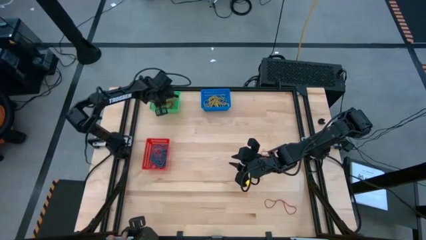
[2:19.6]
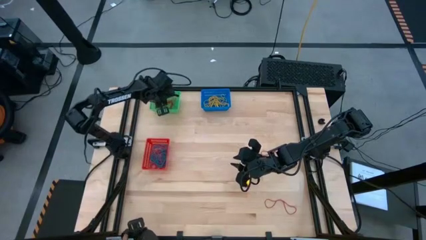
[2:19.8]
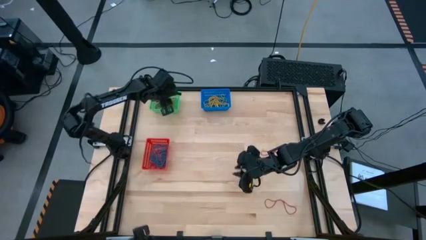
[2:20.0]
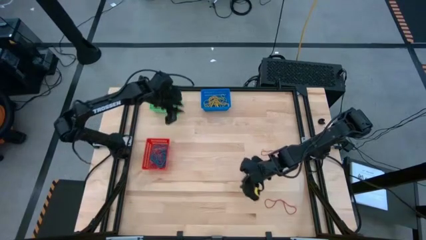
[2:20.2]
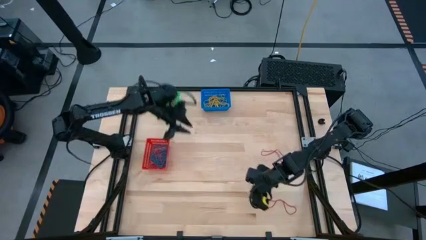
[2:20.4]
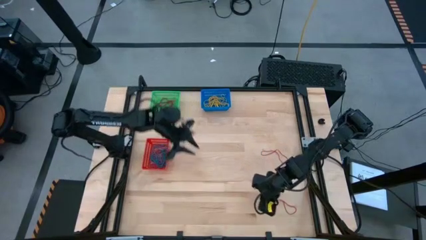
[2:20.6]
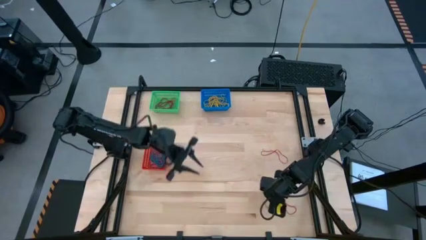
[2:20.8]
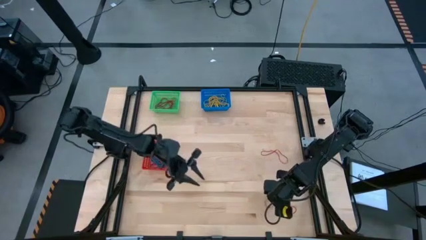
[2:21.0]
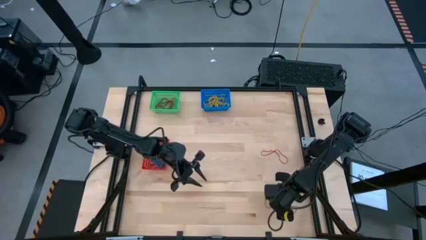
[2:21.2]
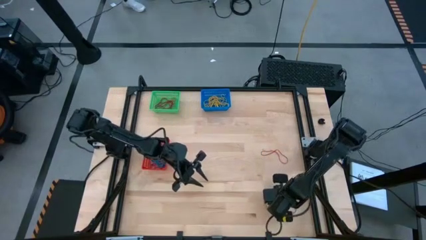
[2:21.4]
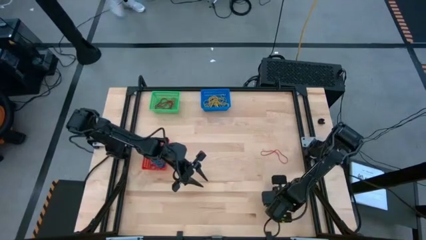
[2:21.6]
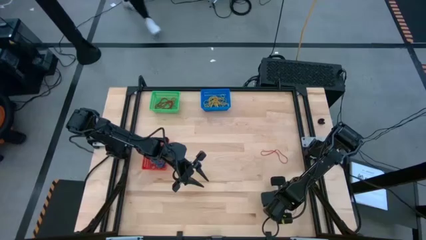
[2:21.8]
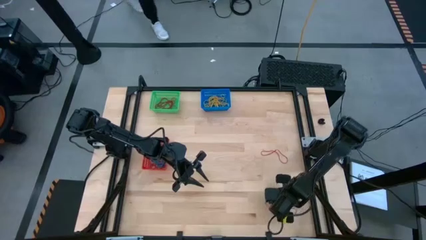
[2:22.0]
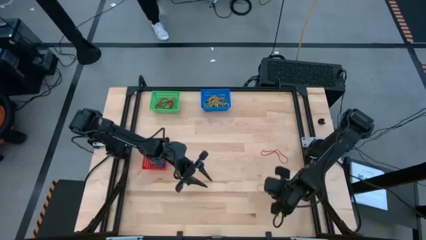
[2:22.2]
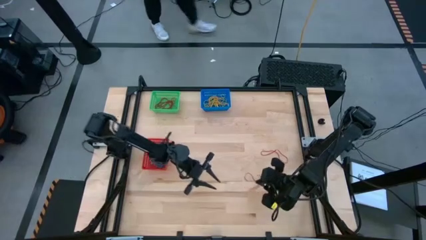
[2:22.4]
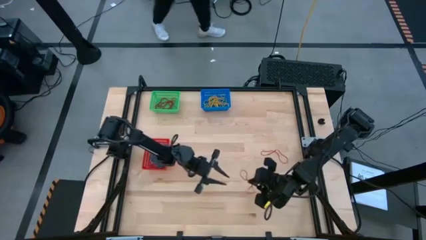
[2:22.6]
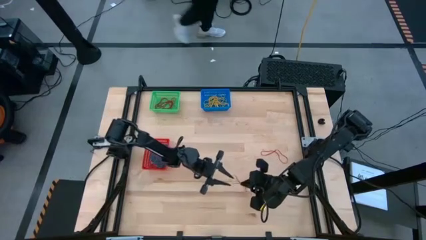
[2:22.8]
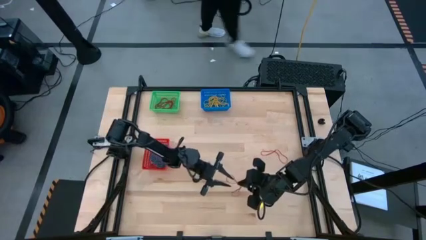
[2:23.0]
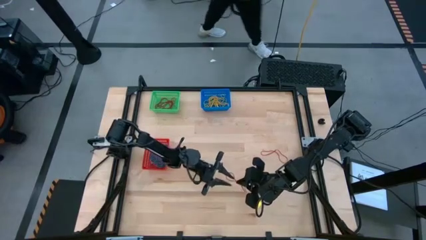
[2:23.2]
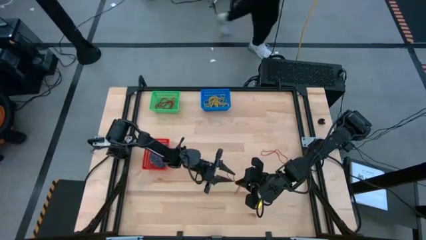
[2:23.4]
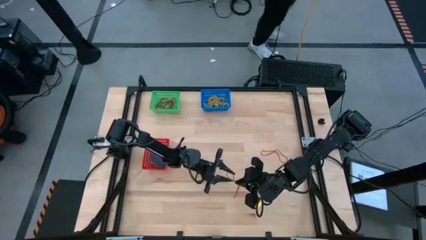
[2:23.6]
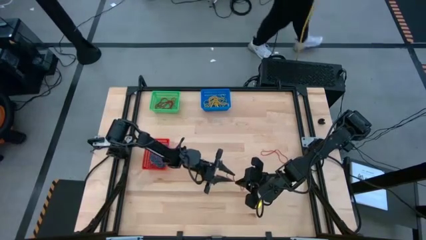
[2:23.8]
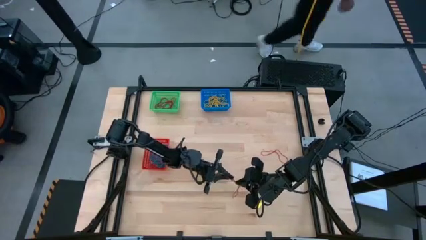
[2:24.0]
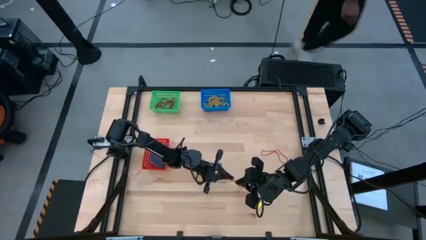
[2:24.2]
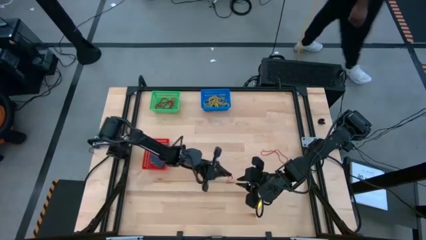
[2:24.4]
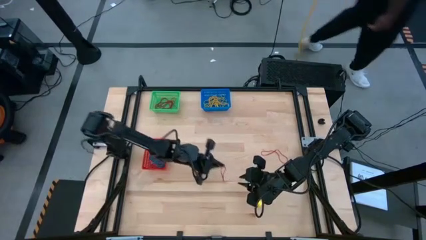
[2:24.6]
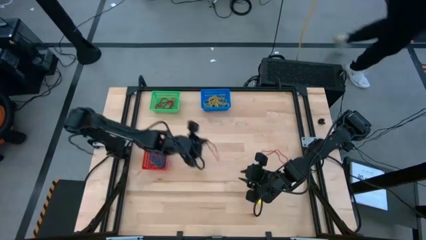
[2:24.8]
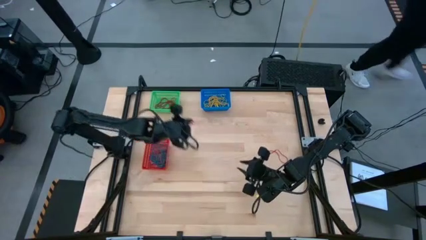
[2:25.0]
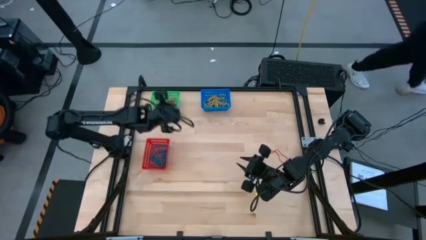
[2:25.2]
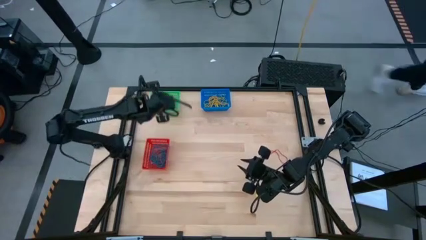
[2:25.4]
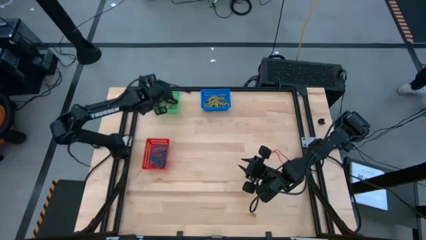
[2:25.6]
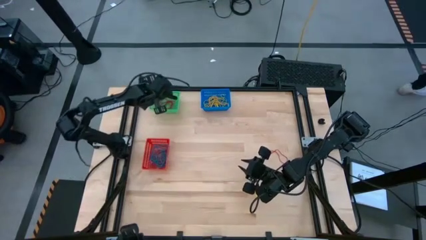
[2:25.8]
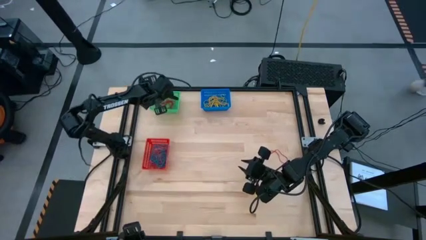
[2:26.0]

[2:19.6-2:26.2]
Task: Sort rubber bands into baskets
Put the red rubber band into the green bin

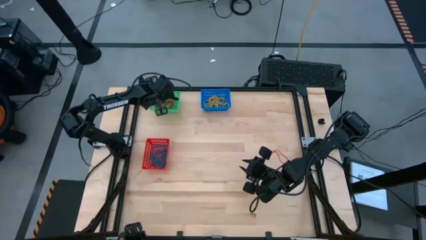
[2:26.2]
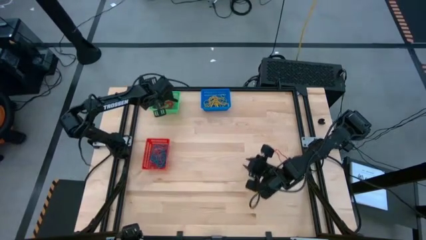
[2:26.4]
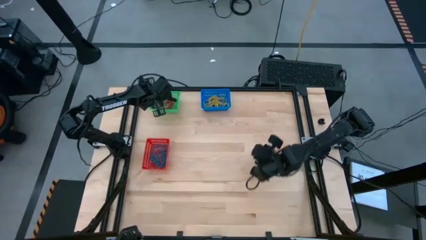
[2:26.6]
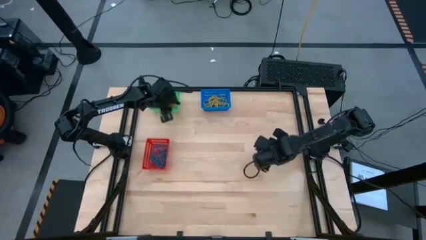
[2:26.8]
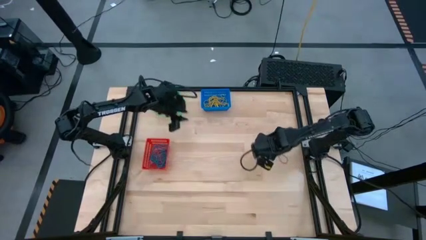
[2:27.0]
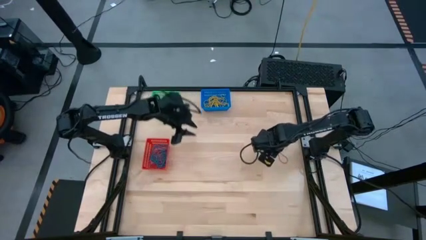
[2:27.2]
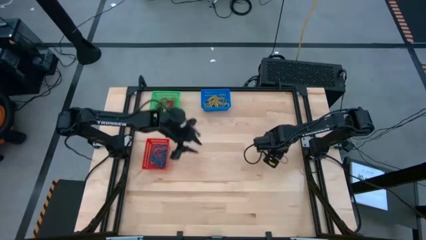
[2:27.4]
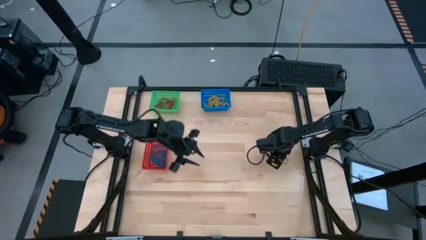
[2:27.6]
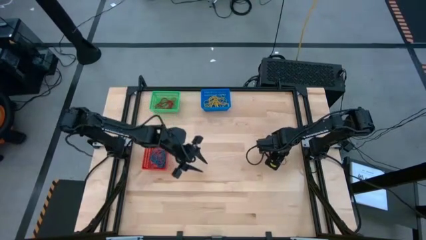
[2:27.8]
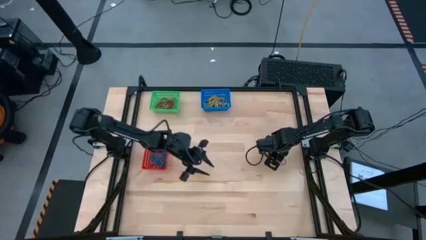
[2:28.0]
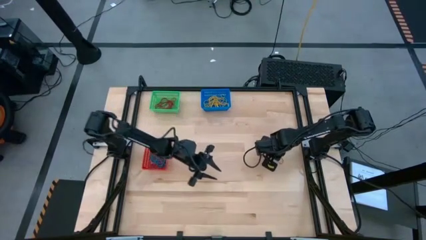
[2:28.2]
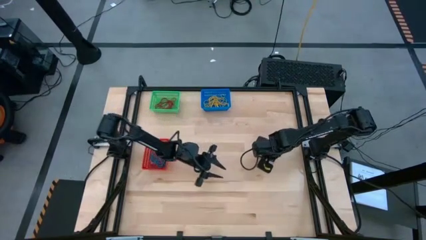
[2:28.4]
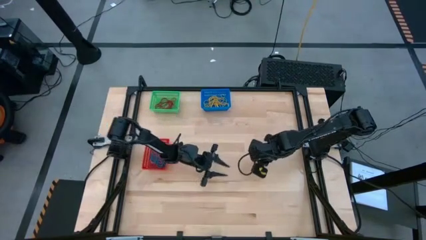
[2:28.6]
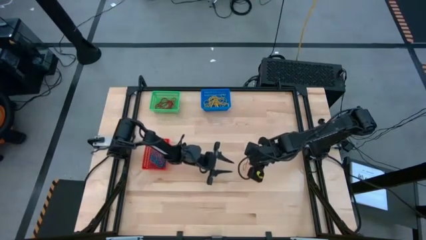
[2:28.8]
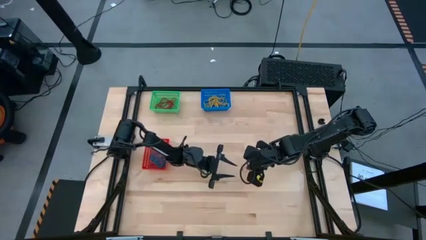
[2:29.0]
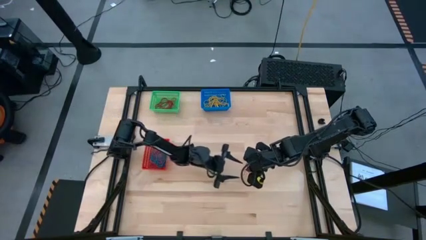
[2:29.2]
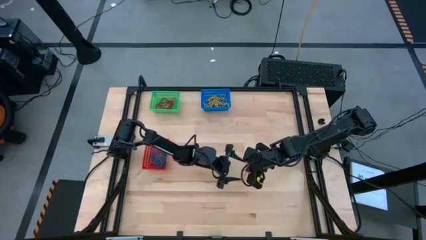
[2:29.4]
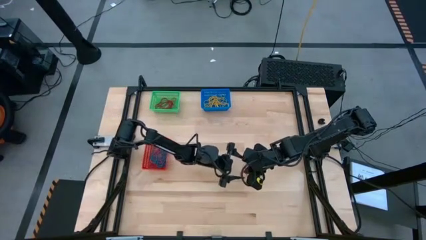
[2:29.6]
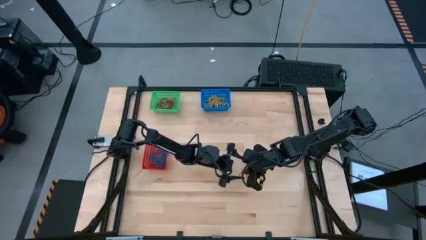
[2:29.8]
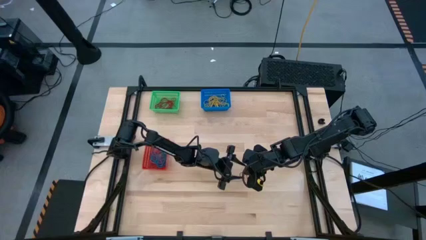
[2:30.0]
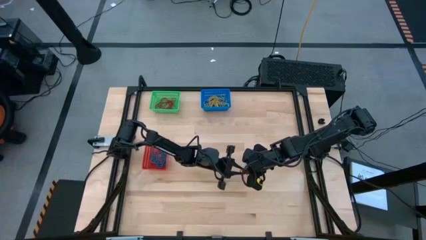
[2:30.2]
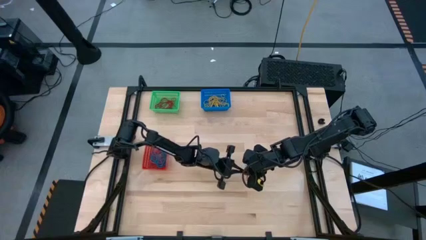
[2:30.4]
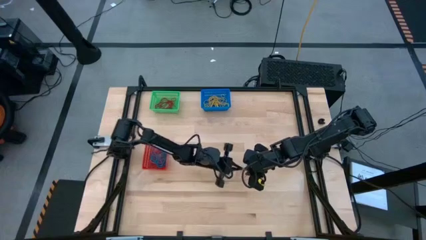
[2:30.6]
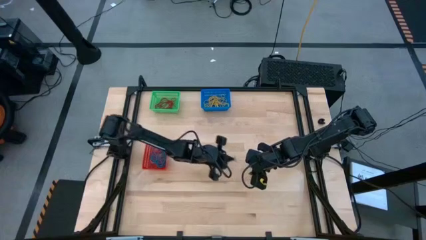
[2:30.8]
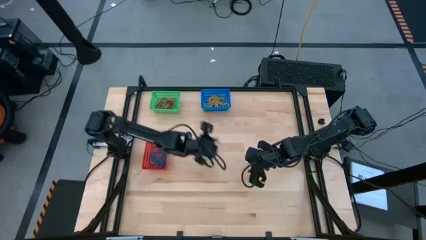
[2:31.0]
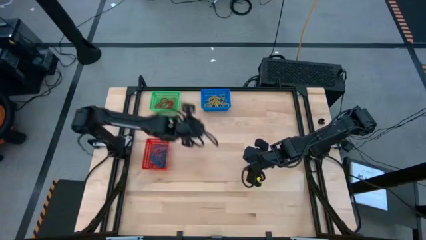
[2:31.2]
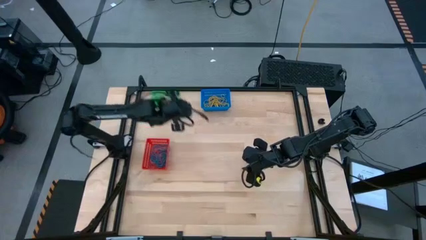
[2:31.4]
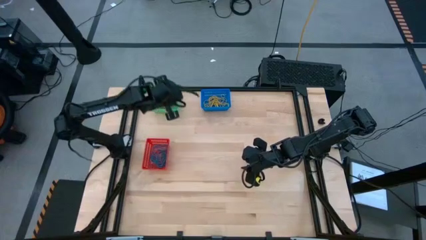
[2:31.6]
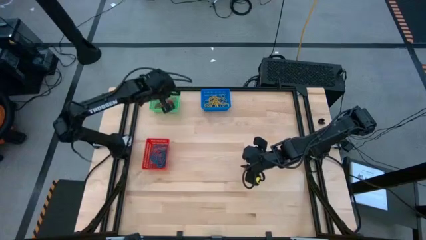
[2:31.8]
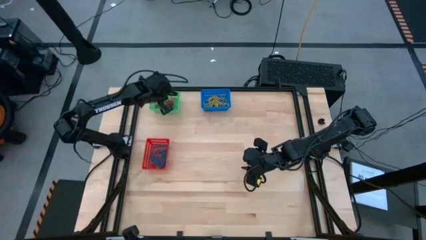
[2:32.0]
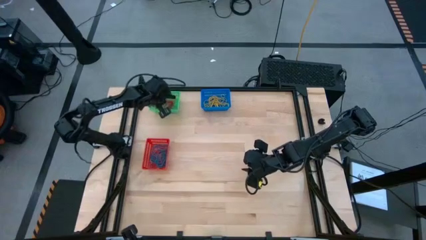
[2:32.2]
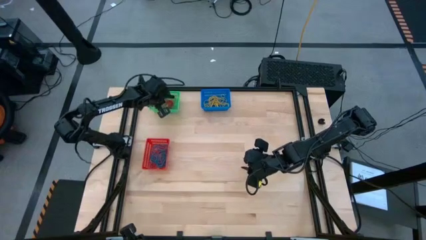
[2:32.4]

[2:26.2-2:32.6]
Put the red rubber band into the green bin

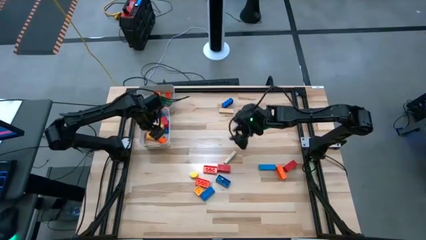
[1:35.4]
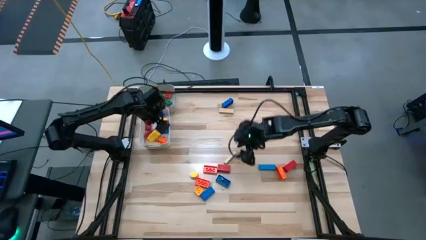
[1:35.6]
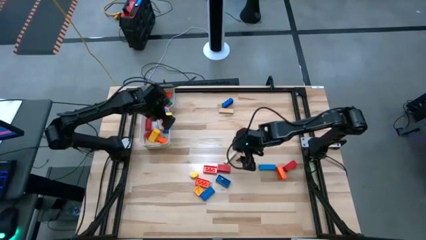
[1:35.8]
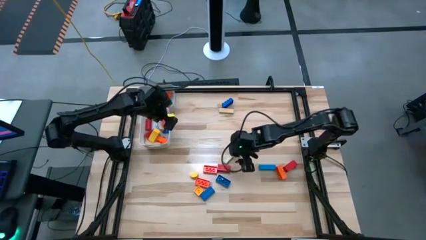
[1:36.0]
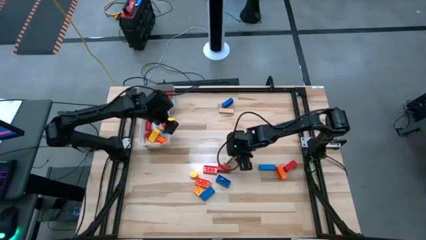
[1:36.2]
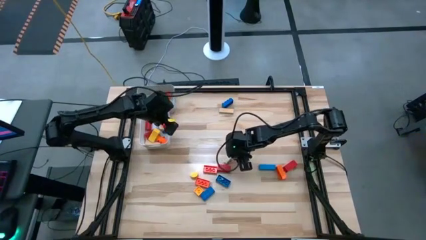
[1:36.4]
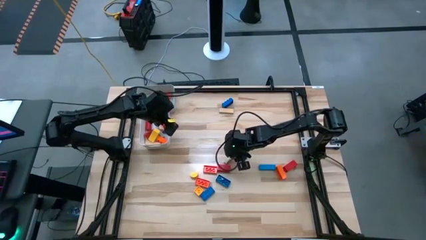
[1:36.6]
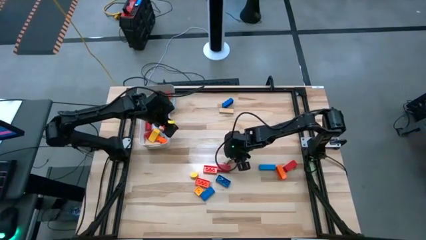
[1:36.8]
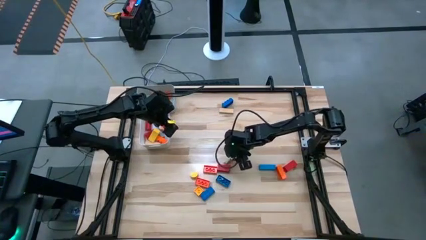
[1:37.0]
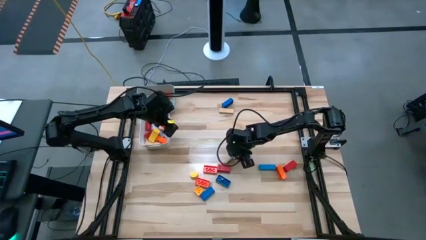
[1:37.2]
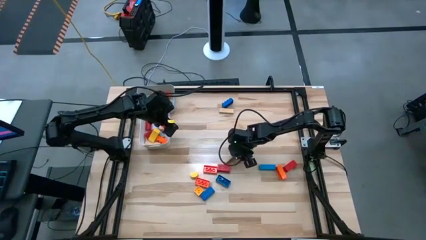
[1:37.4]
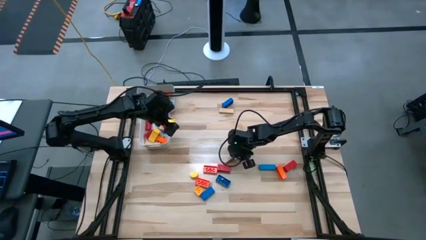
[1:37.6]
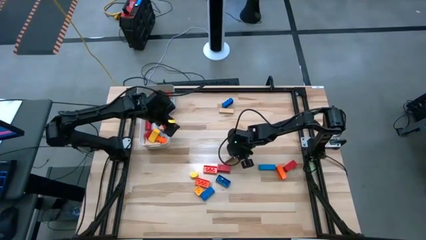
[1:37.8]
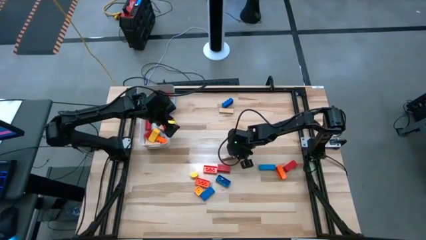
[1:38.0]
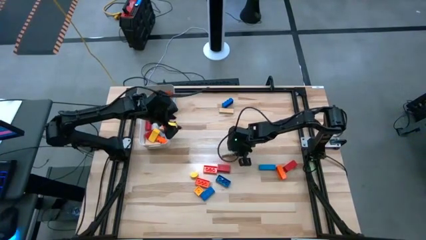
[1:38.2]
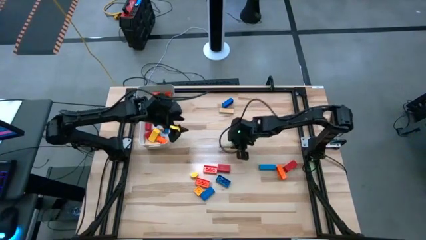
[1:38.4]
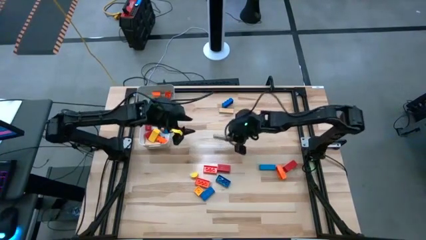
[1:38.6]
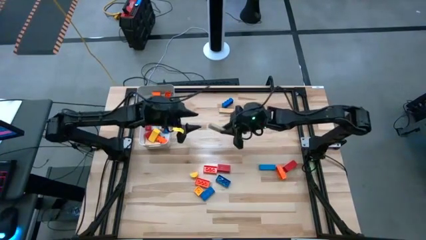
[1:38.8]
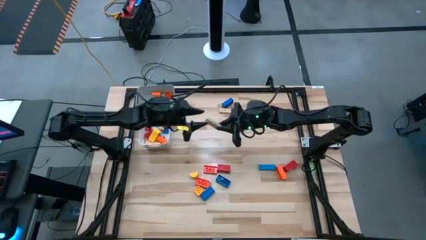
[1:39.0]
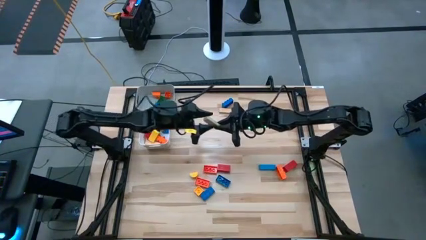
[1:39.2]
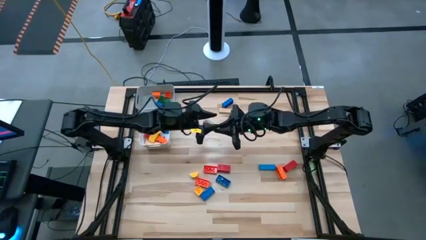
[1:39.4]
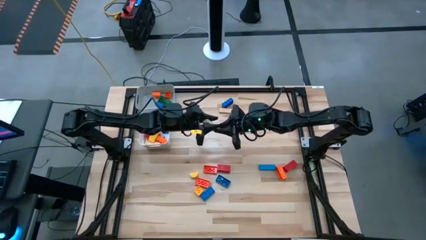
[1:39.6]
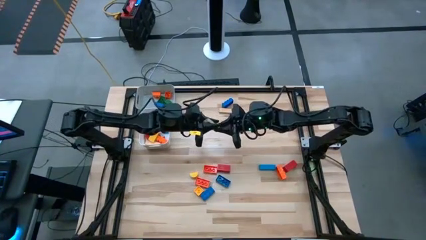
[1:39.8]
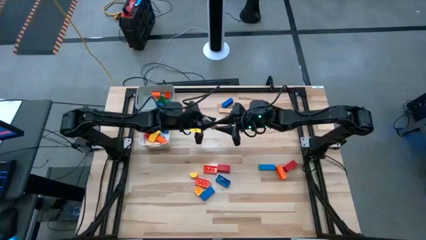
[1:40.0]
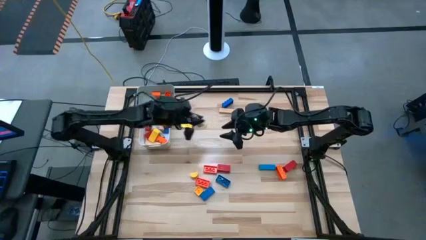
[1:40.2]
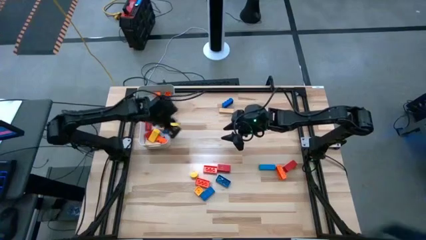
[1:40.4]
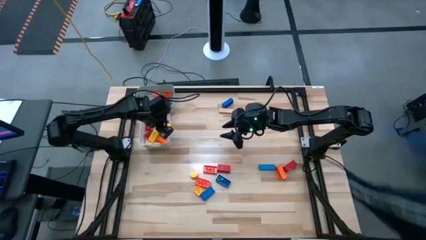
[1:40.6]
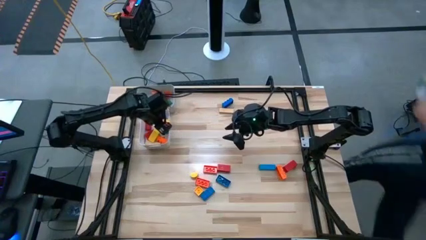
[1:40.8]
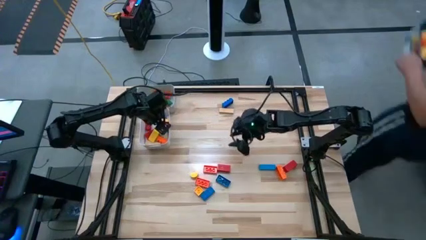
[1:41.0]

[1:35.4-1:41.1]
Task: Sort blocks by size
Put the large brown wooden block into the white bin
